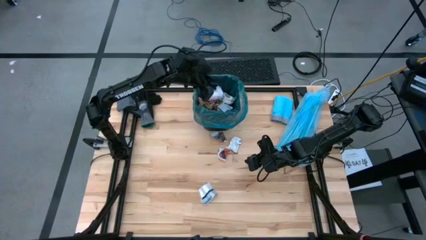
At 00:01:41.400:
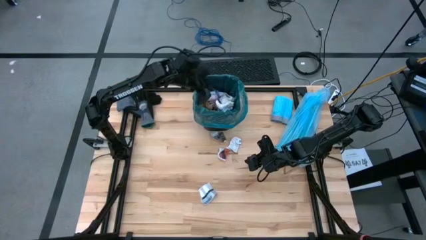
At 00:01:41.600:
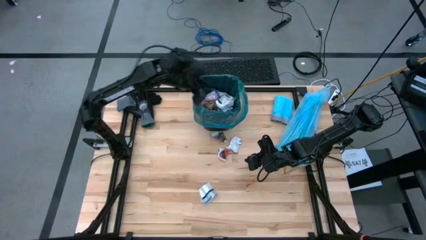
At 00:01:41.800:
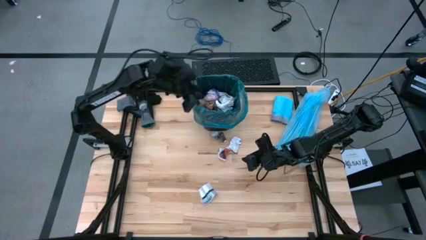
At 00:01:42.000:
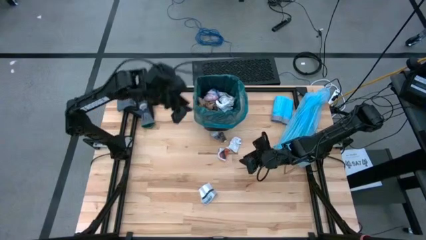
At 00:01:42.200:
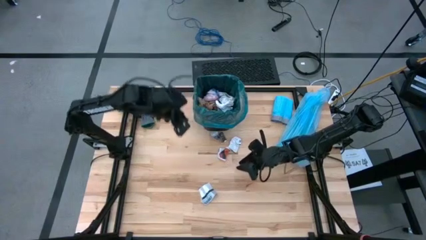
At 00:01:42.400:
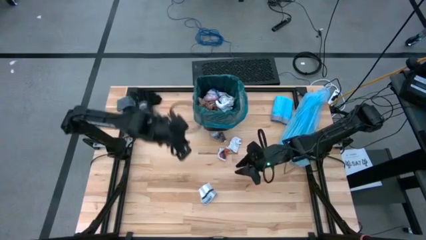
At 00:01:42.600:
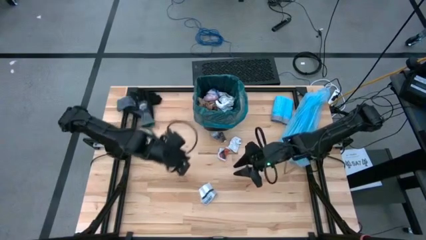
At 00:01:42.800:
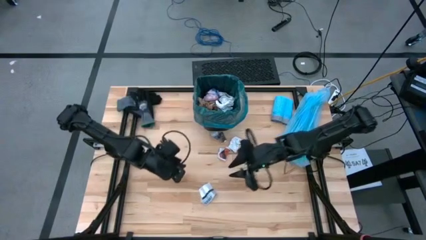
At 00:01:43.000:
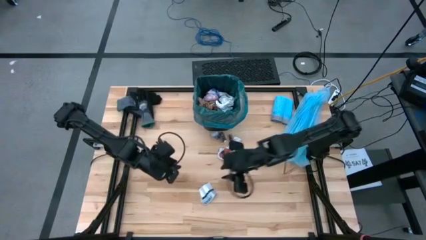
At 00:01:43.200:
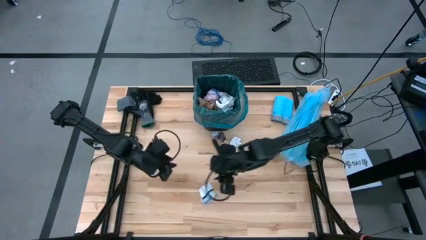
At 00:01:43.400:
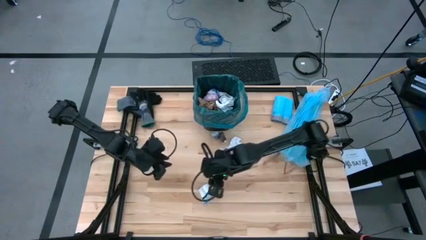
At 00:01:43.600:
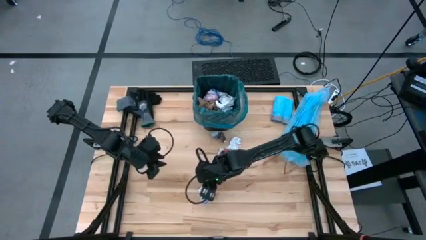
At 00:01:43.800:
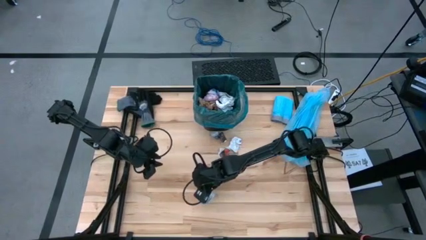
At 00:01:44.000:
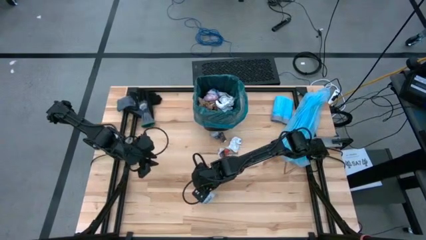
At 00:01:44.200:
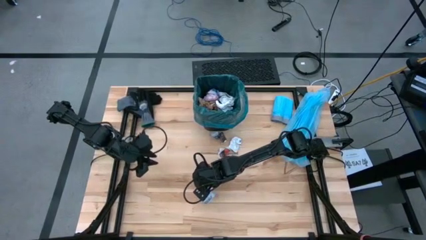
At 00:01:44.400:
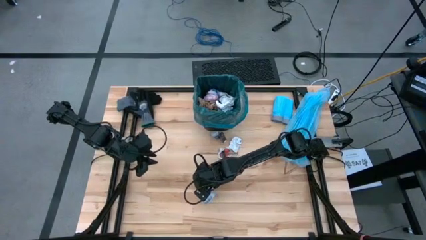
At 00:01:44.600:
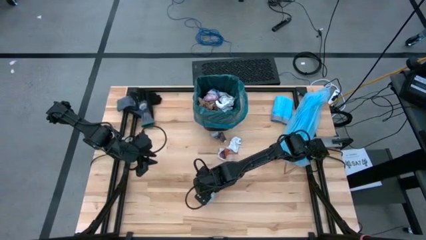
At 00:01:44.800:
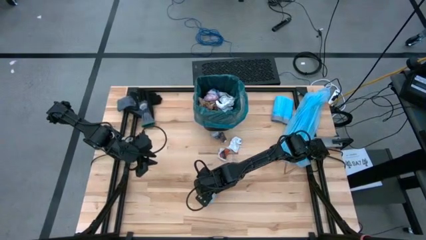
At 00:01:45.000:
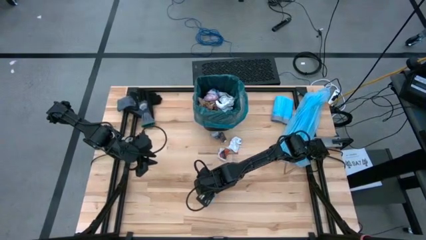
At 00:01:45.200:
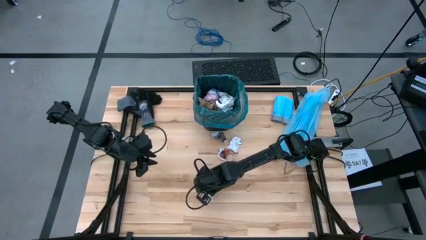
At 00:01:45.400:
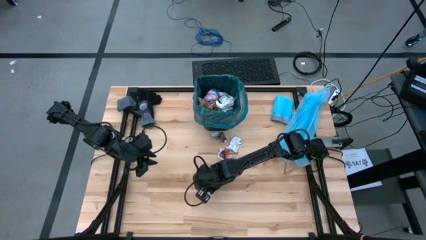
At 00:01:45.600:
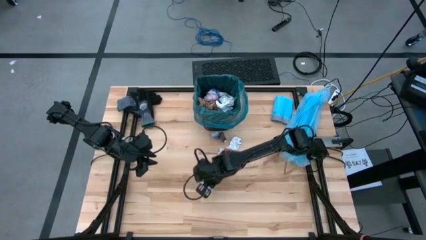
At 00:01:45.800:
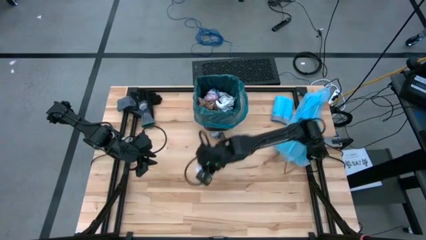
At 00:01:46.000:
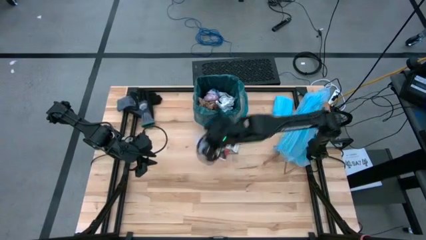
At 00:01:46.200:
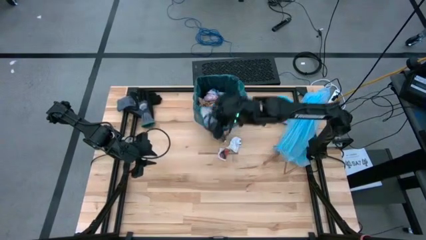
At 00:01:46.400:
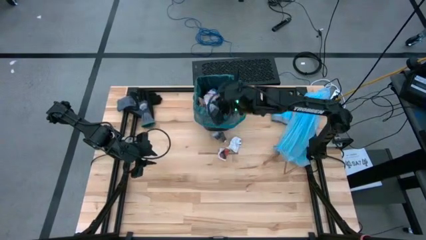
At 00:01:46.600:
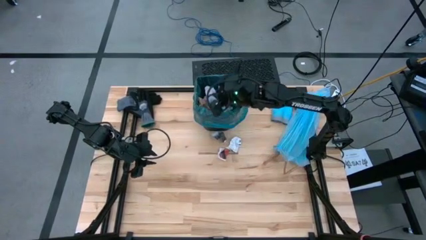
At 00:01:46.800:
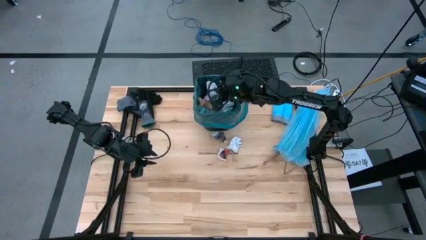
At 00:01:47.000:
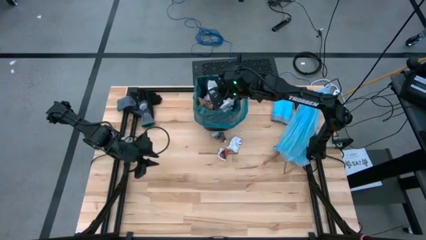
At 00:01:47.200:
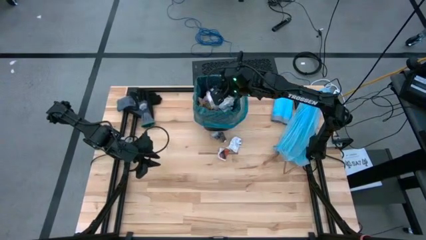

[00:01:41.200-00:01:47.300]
Task: place trash/remove bag and relplace
Put the white paper into the trash bin

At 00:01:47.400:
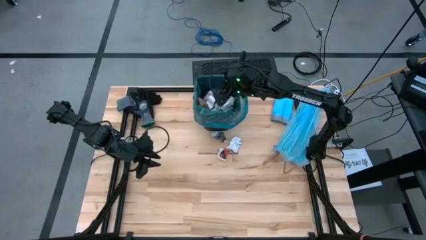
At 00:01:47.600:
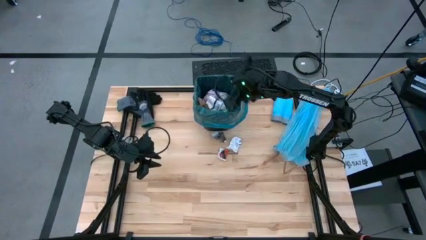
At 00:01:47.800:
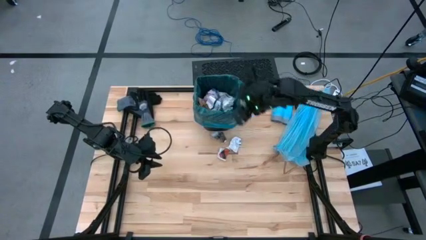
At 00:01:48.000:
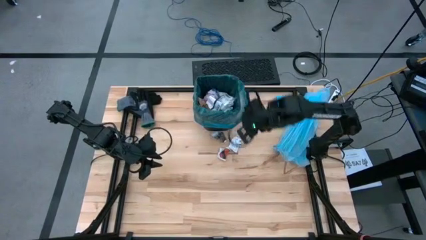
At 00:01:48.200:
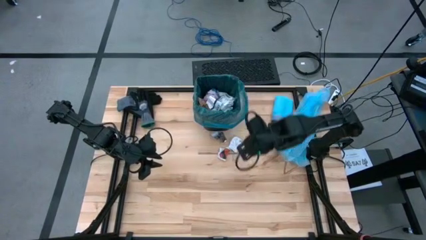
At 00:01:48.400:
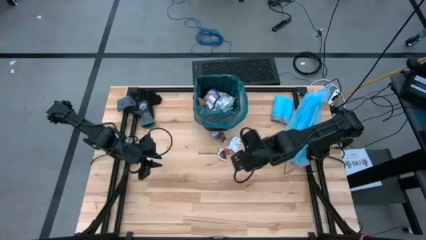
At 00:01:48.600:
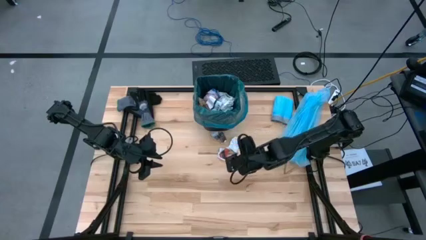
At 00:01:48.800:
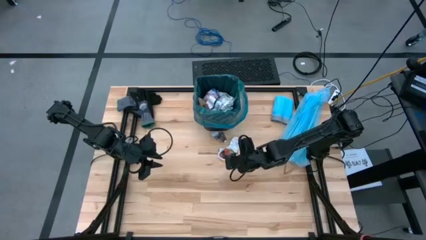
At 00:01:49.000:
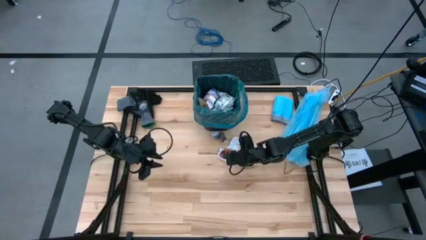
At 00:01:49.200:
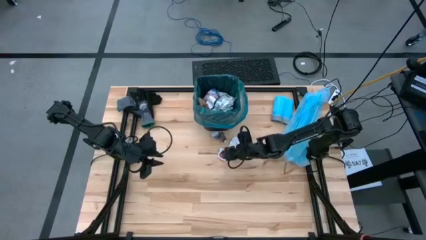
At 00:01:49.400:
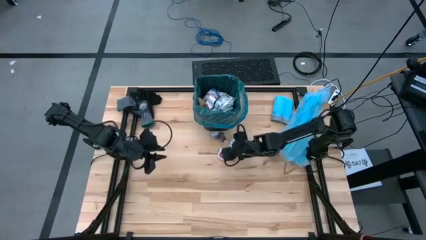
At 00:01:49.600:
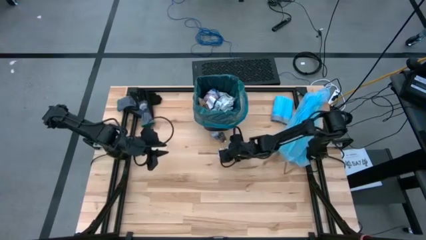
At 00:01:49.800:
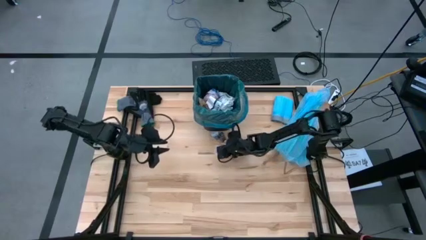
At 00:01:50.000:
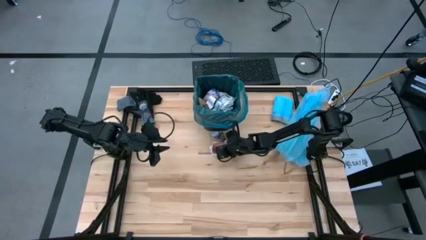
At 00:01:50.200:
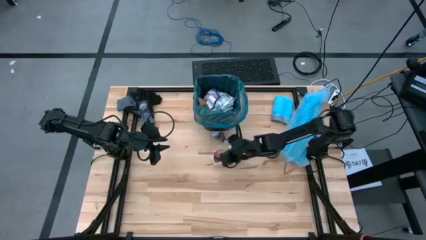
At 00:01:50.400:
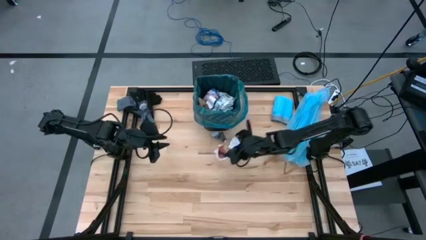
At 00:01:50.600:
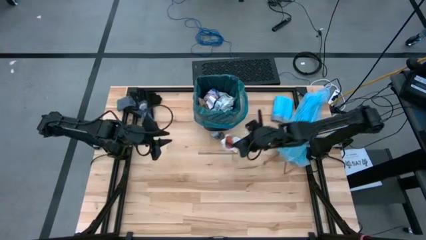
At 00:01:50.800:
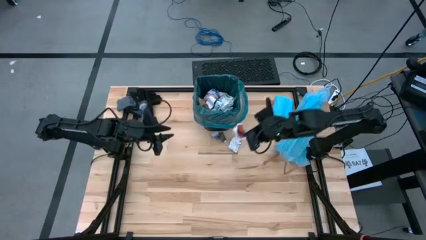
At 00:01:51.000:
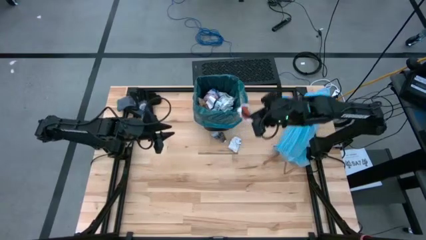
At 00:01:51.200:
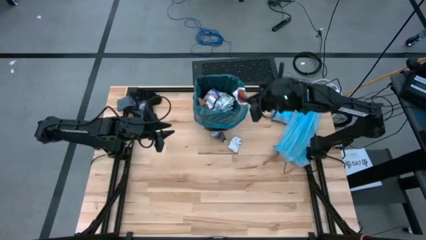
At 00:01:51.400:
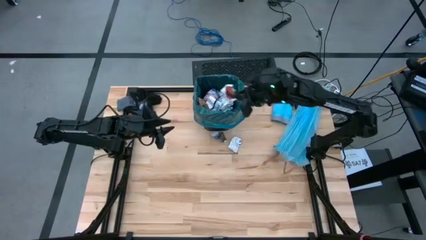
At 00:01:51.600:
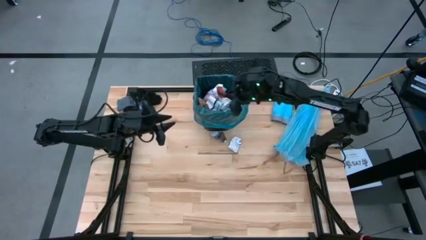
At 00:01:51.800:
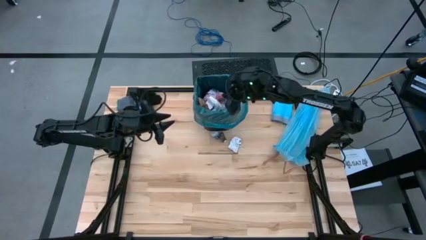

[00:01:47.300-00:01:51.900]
Put the white paper into the trash bin

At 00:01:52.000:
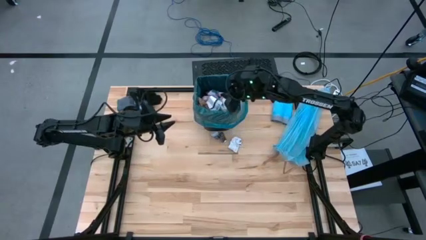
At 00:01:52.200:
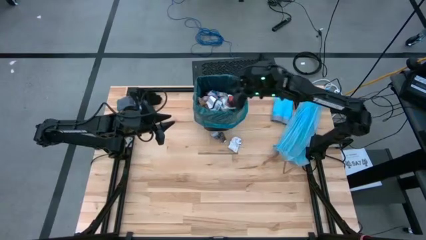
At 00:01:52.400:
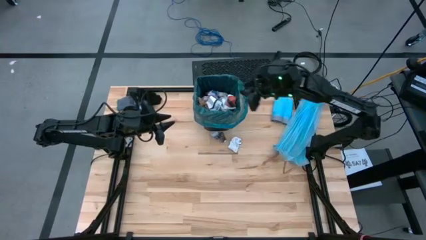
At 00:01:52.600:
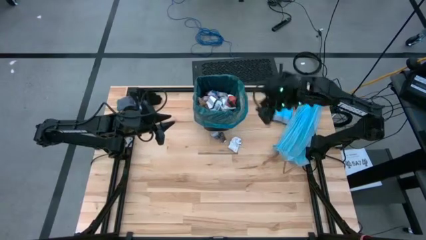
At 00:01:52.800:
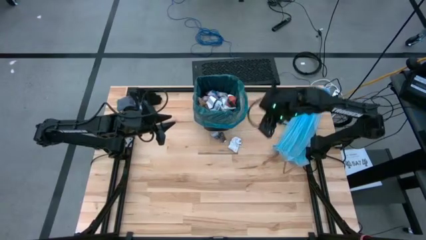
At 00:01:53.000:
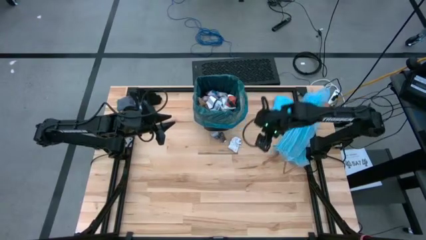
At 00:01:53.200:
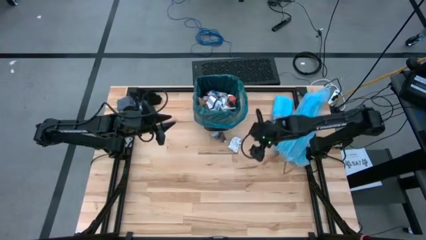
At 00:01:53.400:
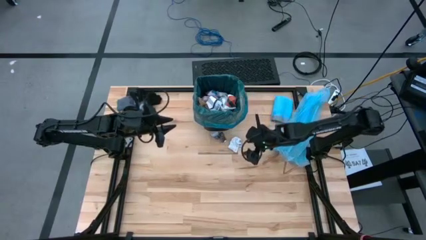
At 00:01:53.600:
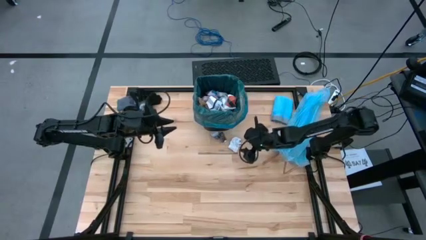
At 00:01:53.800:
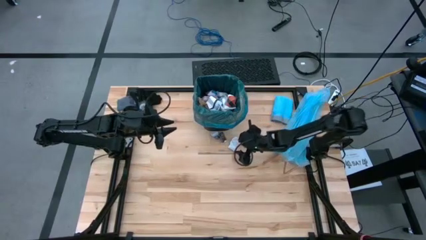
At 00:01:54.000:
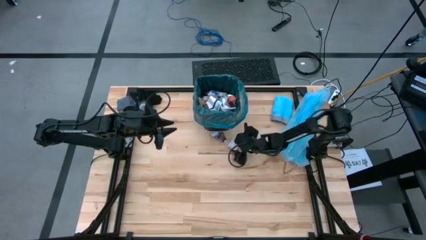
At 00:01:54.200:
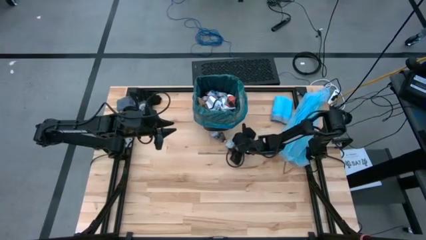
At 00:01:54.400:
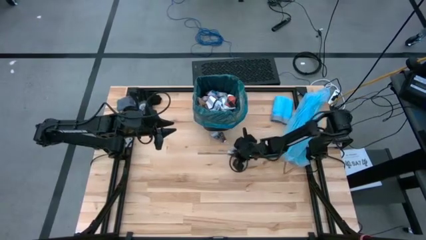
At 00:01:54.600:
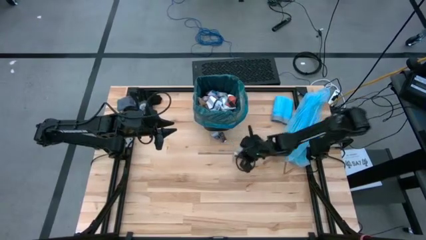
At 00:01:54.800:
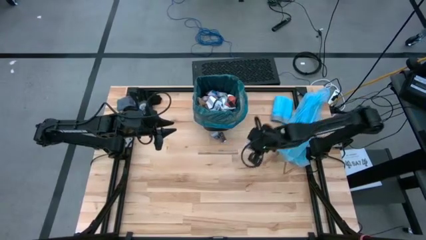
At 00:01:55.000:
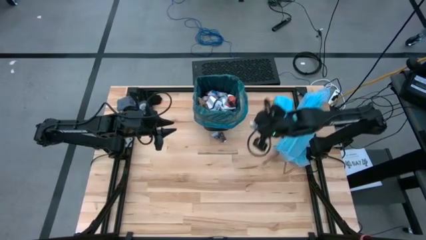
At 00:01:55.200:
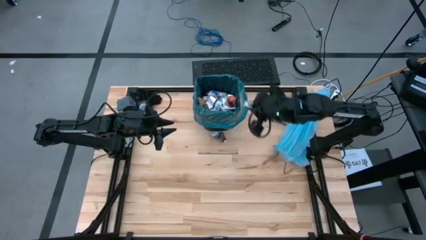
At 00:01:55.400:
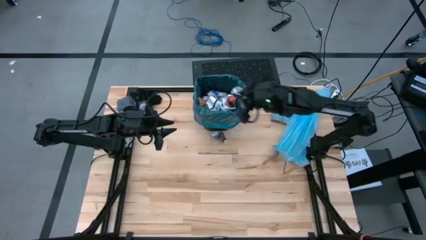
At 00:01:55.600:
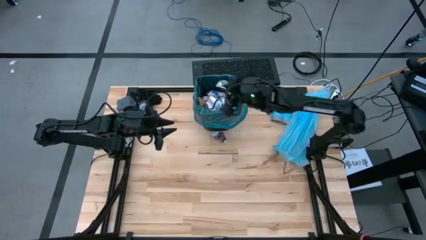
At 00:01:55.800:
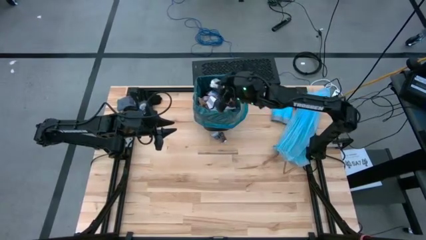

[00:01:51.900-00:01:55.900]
Put the white paper into the trash bin

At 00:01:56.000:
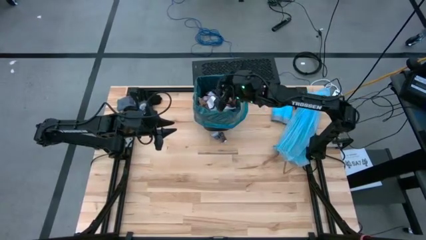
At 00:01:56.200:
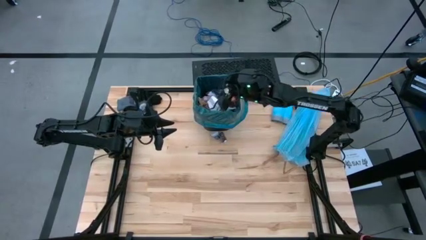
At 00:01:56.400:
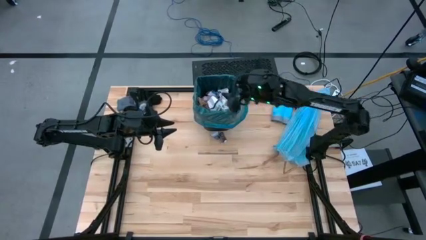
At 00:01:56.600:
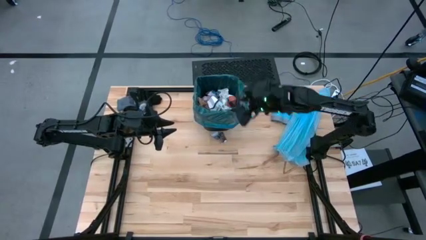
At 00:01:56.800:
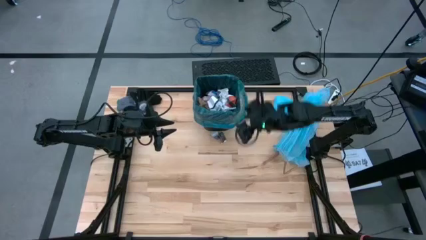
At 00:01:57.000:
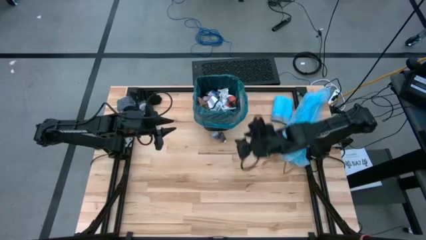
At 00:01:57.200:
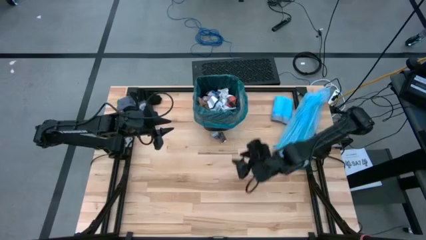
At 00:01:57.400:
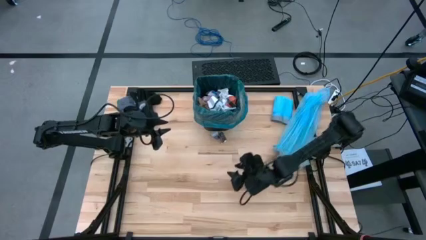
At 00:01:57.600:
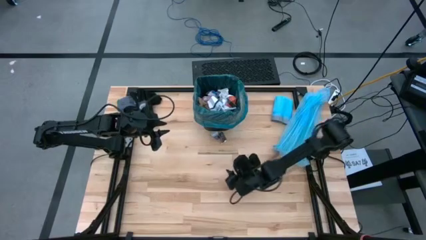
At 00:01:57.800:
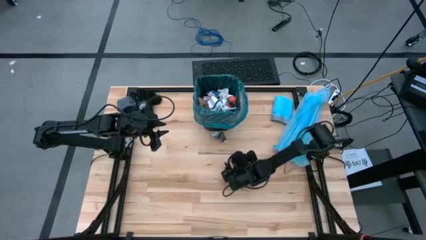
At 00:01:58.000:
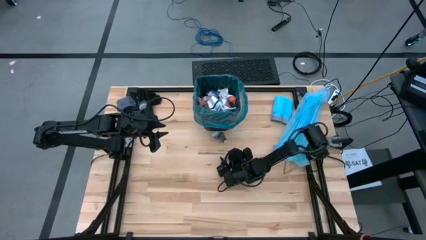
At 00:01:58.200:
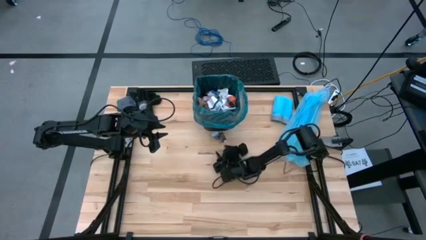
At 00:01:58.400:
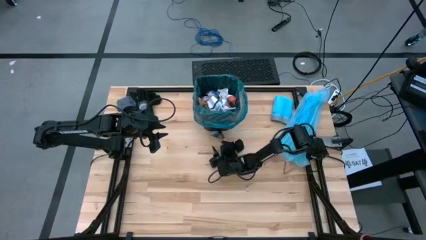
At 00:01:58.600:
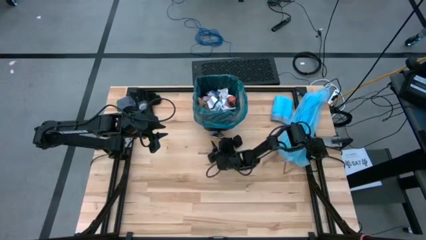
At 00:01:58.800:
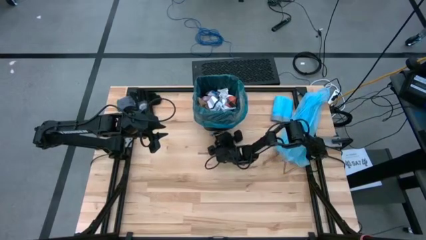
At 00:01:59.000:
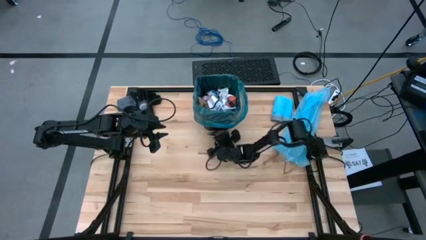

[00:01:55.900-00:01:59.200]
Put the white paper into the trash bin
